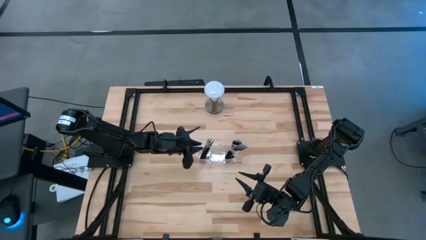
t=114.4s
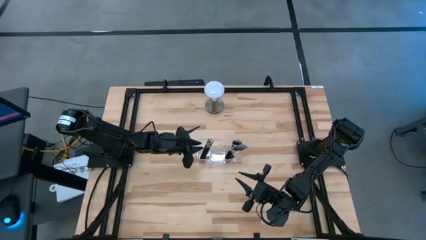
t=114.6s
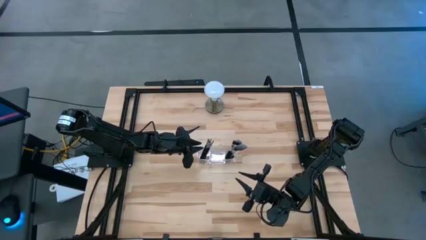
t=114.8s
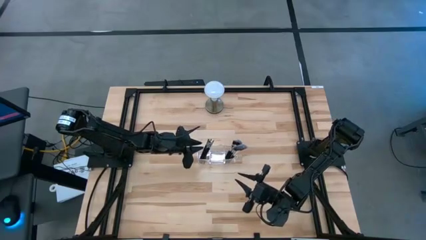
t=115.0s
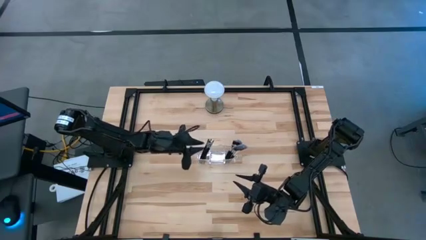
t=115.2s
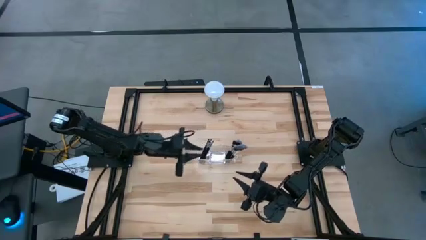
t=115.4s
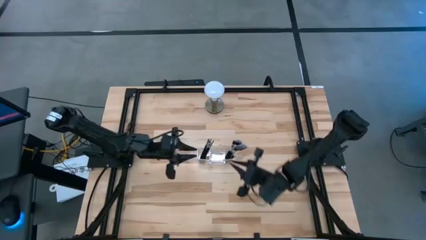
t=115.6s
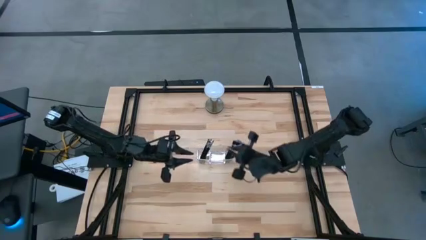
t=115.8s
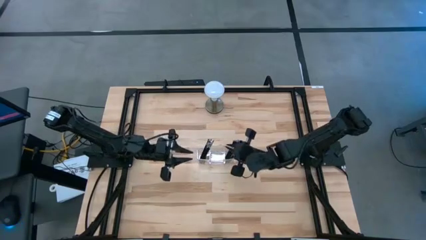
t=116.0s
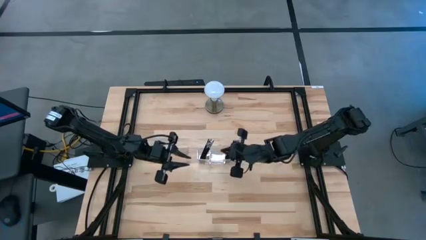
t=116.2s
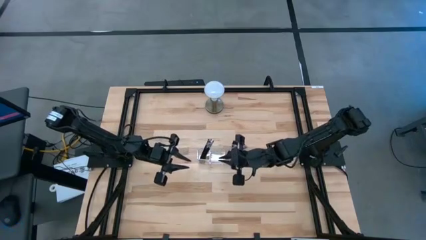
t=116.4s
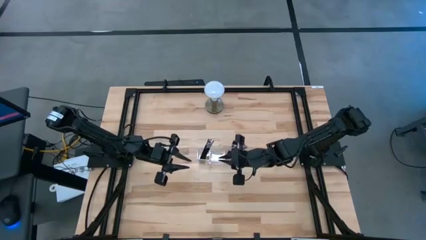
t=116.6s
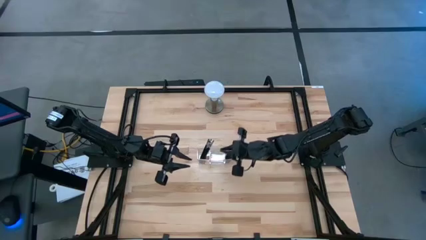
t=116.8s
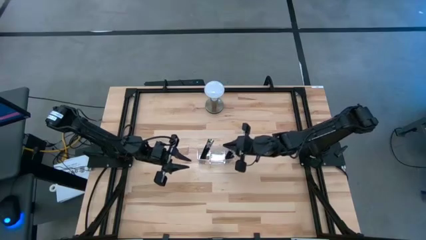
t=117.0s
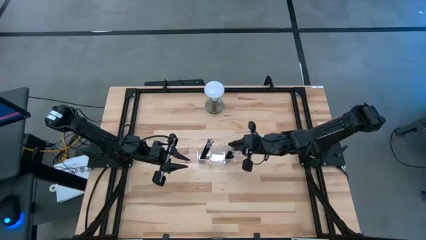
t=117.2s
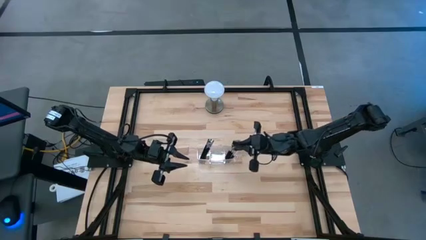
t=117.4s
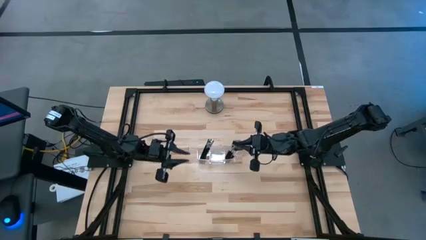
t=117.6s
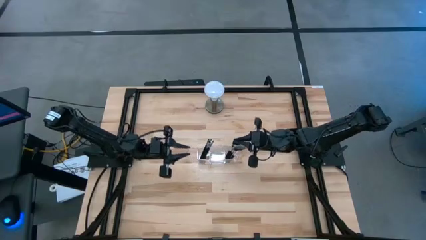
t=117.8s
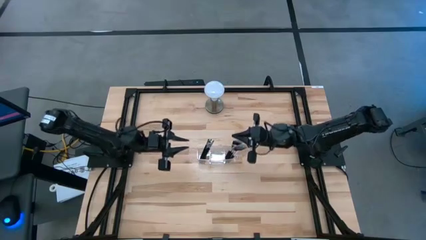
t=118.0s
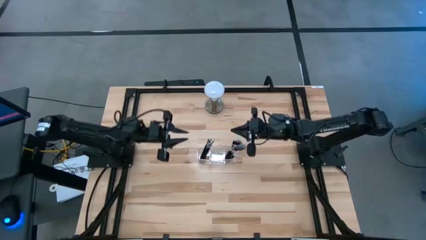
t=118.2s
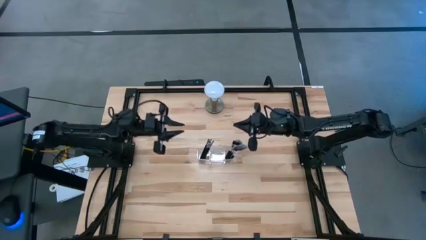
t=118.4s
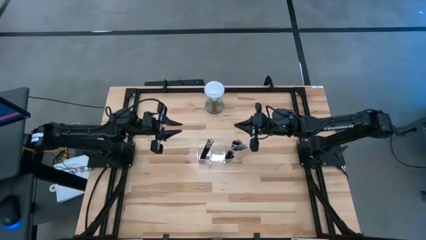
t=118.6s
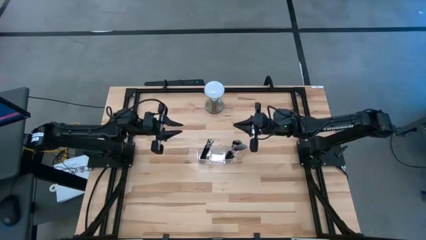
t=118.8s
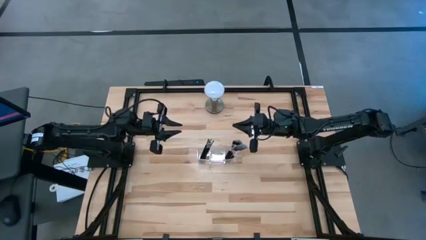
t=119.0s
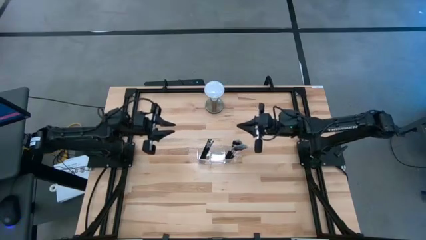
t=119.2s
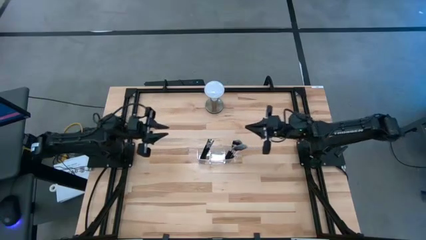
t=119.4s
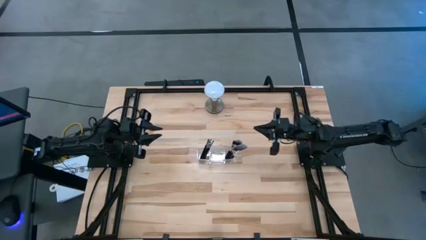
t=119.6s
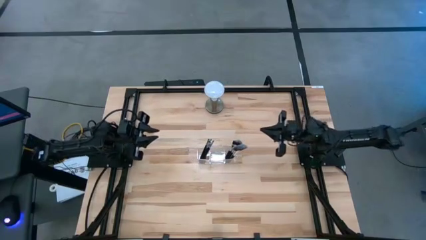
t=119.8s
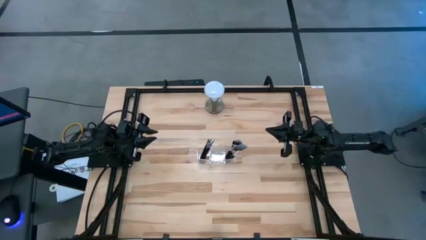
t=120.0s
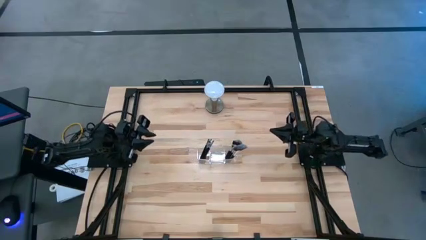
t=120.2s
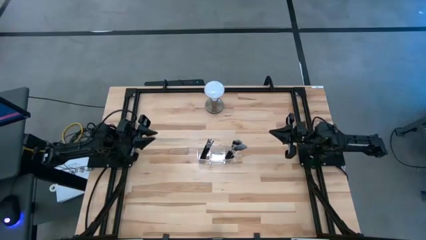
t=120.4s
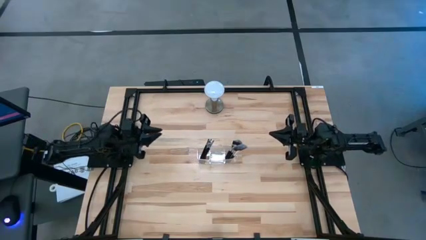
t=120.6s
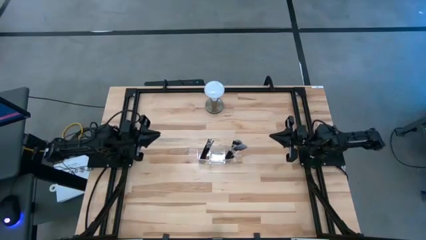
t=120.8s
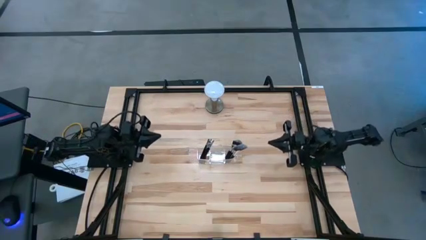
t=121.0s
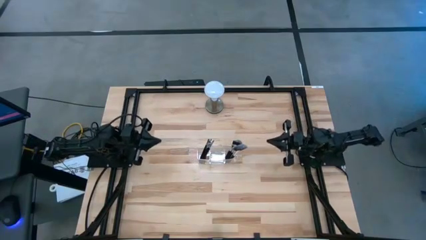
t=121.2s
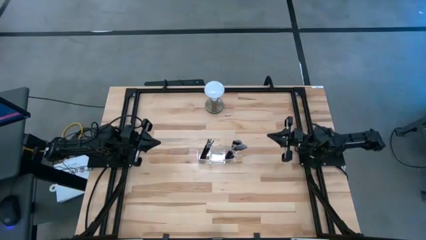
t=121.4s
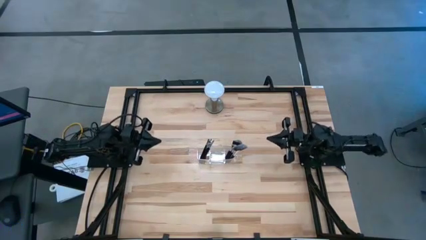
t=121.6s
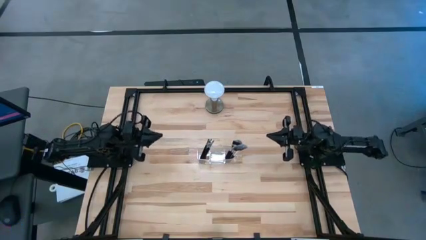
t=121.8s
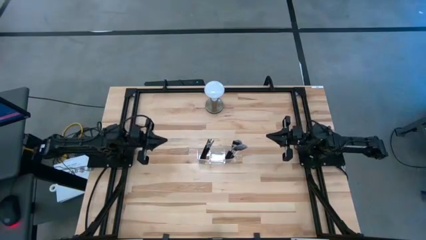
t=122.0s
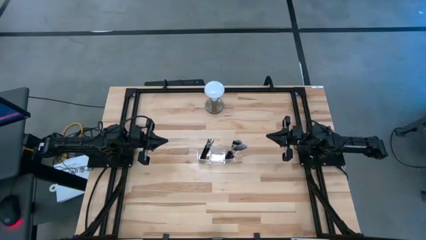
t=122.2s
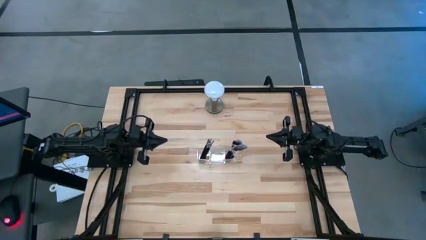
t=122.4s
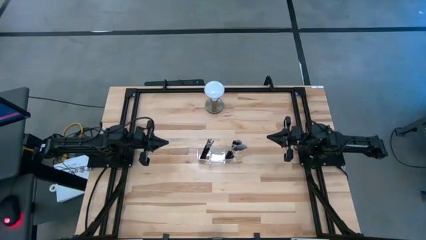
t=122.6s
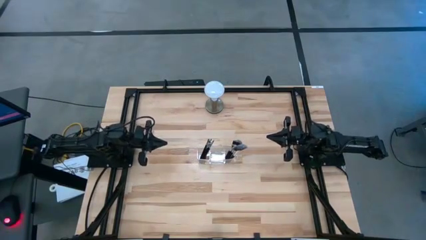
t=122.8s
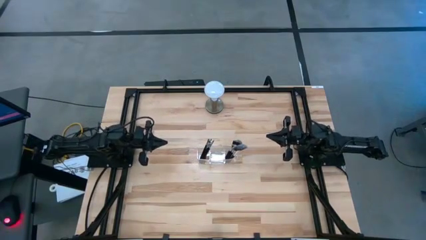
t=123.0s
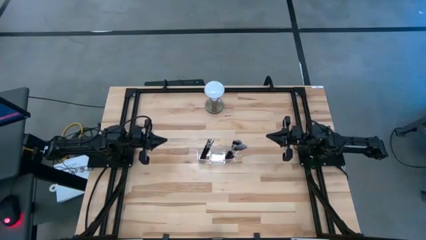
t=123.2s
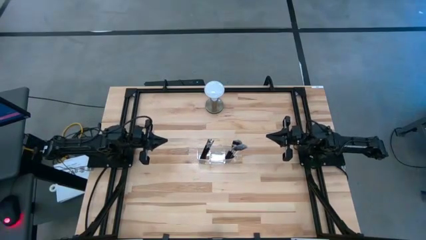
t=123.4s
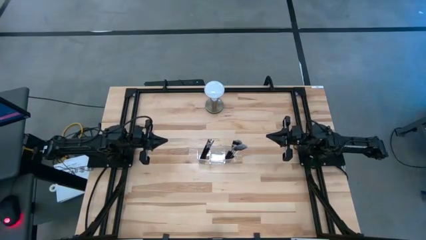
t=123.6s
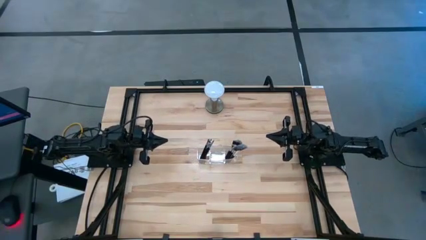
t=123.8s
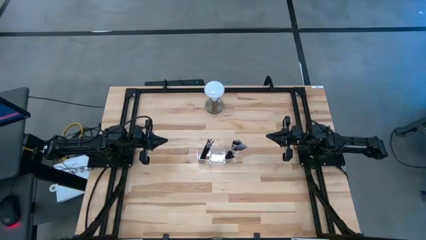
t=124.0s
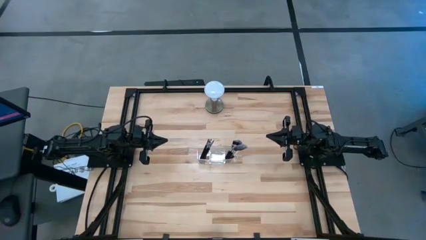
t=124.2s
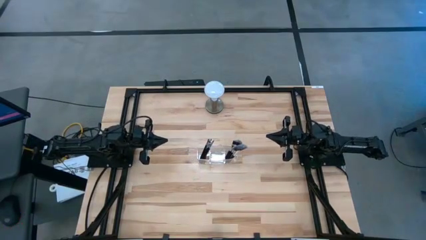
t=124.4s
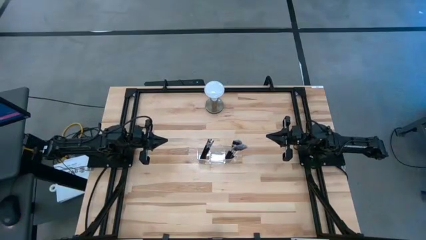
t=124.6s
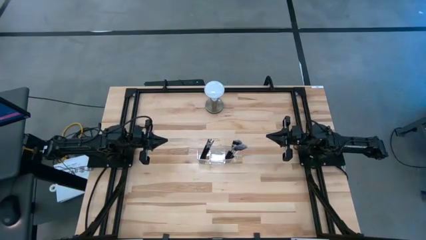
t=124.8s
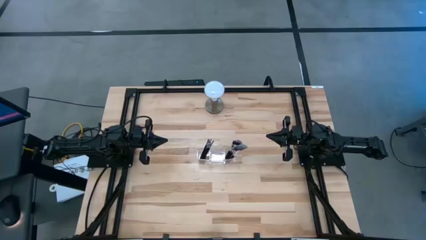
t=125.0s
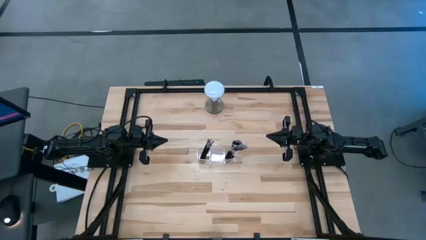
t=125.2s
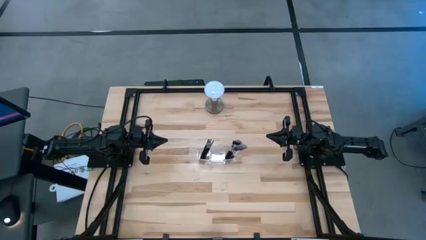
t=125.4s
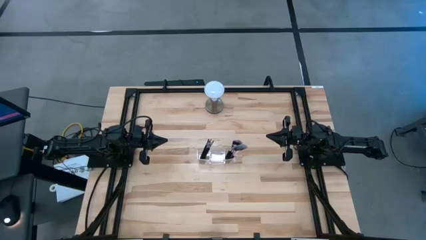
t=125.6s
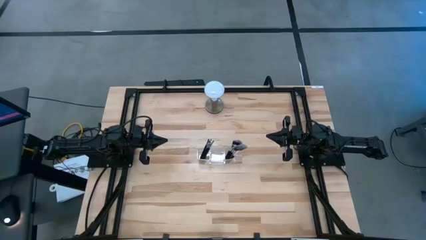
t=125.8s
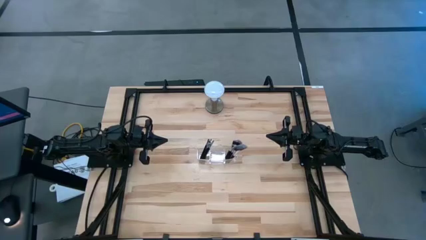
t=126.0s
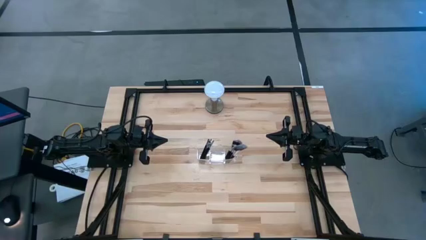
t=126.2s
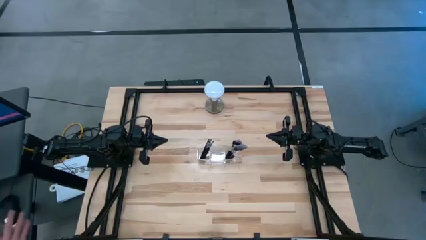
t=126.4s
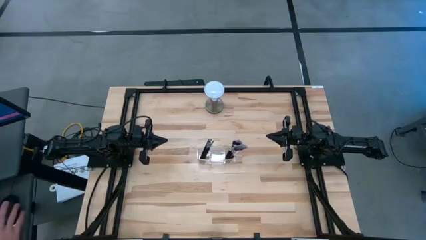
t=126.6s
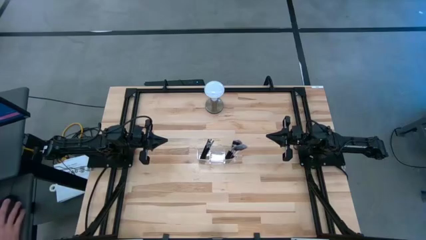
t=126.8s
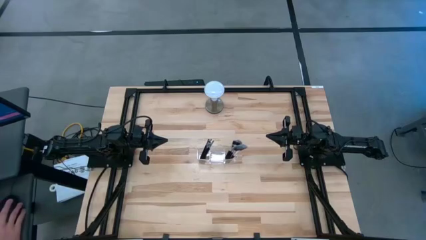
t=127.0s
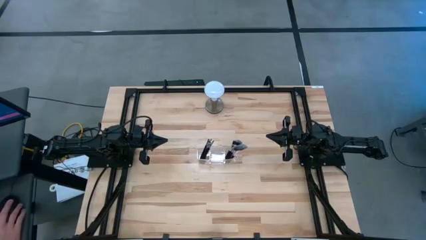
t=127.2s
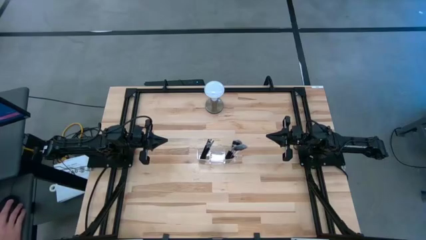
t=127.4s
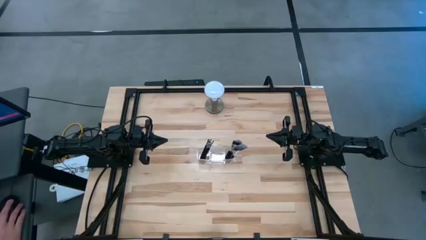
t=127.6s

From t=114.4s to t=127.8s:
Task: Put items in baskets/containers
Return to Home Position

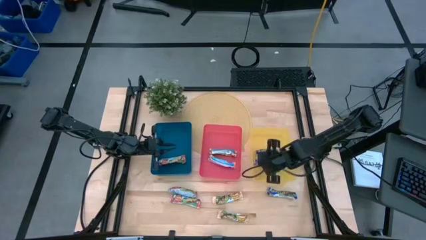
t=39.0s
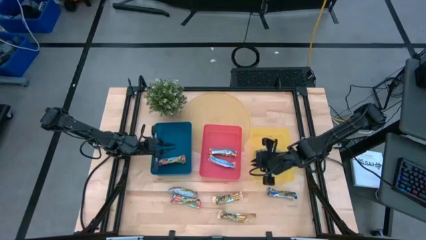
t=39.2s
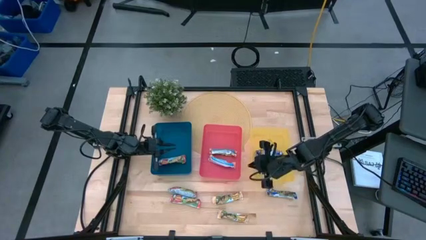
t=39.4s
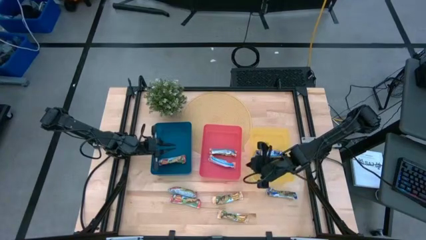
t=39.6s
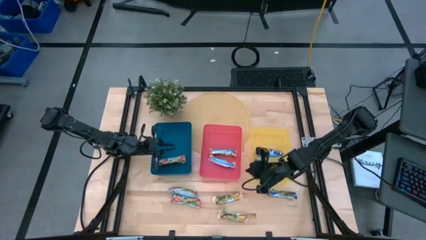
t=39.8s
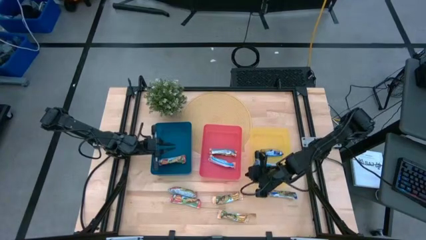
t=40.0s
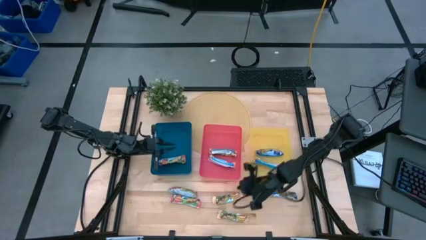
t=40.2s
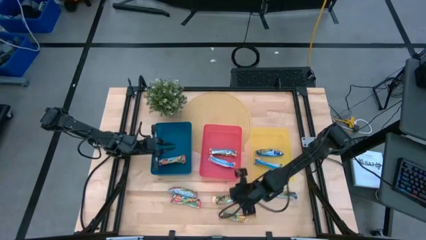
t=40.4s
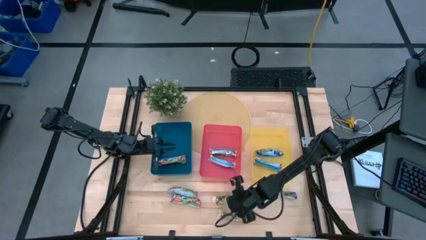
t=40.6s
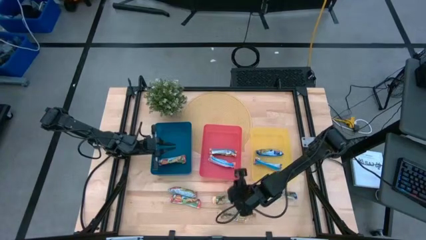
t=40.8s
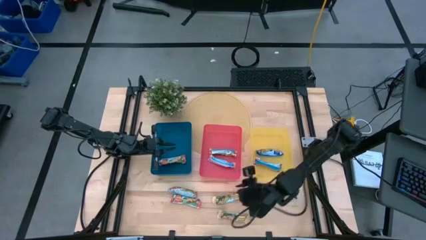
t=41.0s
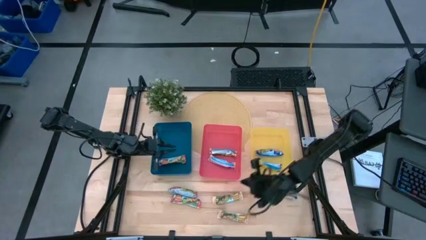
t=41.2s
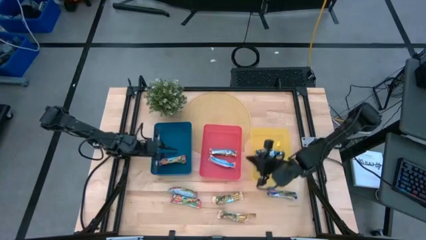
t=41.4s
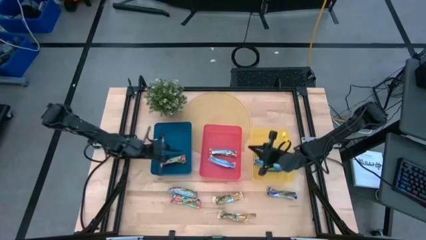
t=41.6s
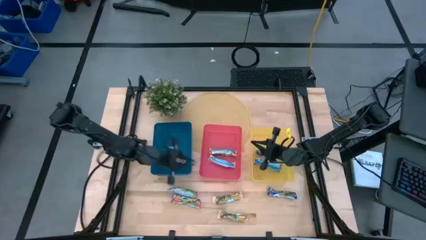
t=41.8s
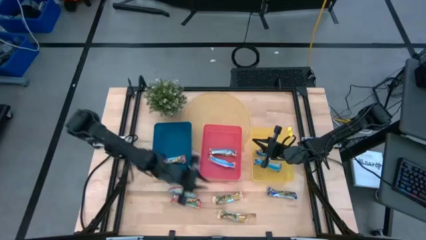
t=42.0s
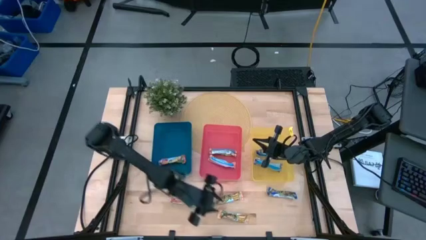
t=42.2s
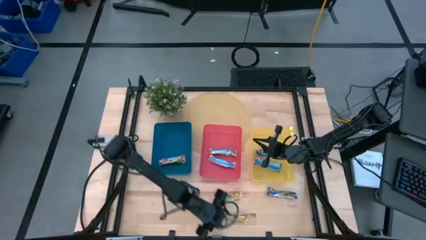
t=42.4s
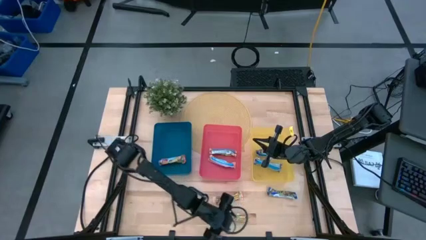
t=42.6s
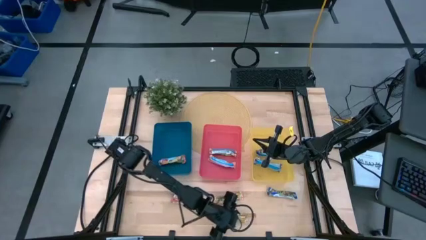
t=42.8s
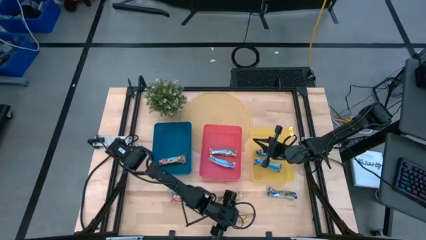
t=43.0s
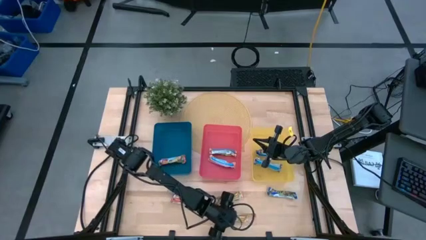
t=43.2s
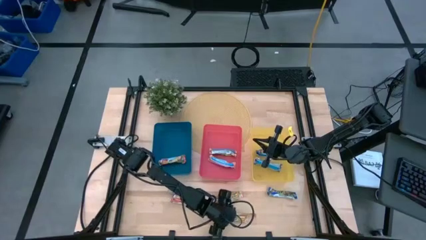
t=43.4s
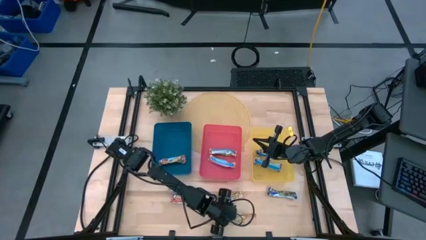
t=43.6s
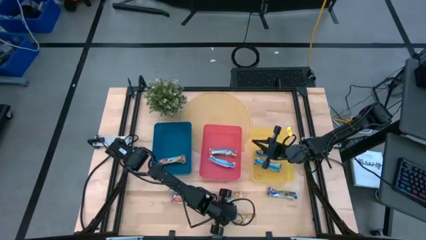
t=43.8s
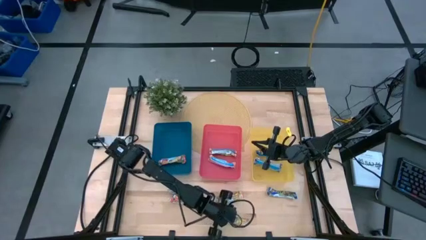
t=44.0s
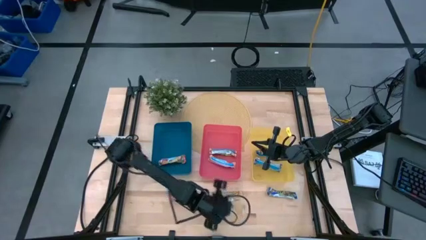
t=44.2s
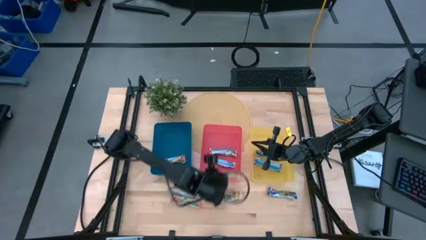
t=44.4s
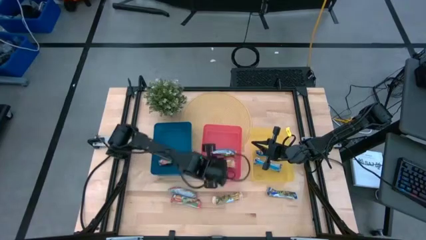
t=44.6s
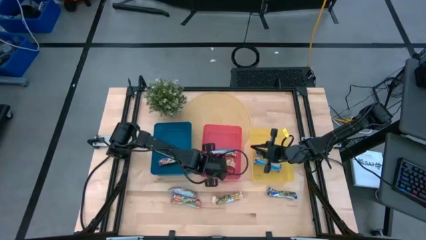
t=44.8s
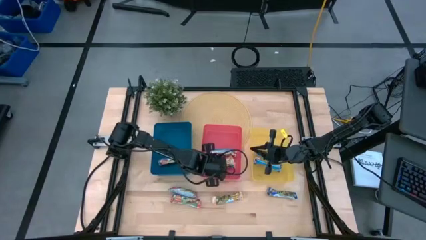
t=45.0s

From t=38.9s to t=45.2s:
Task: Pick and place Granola Bars by type
Put the yellow granola bar into the red bin
